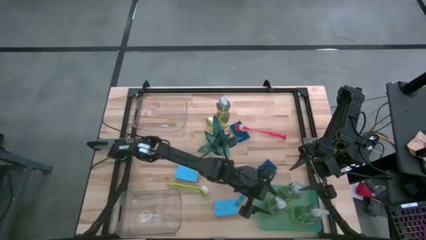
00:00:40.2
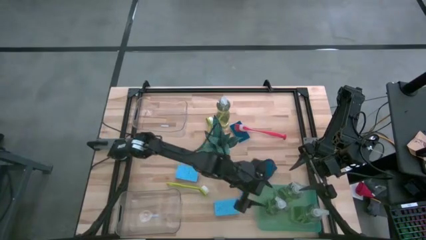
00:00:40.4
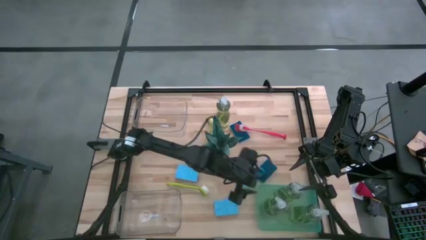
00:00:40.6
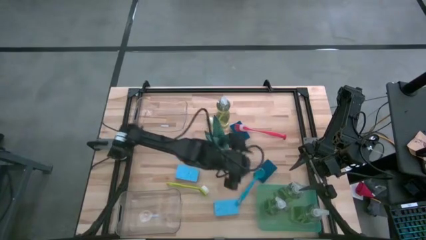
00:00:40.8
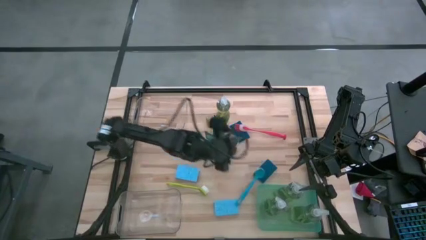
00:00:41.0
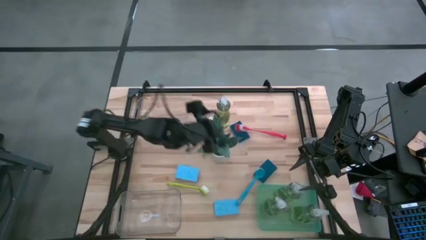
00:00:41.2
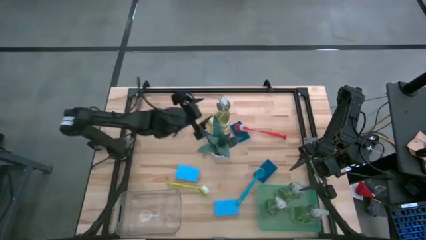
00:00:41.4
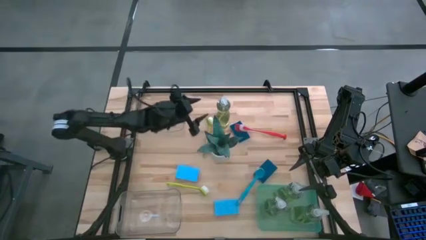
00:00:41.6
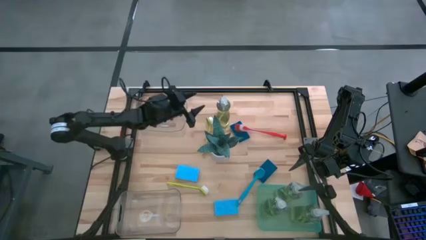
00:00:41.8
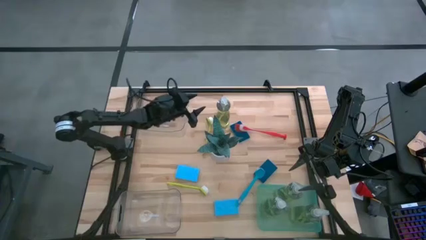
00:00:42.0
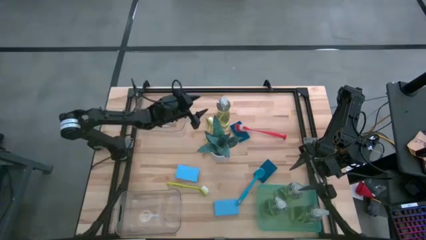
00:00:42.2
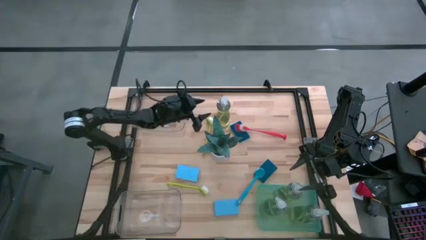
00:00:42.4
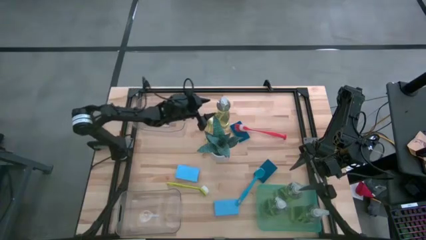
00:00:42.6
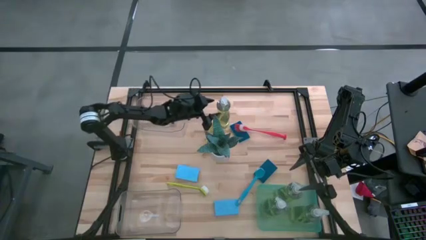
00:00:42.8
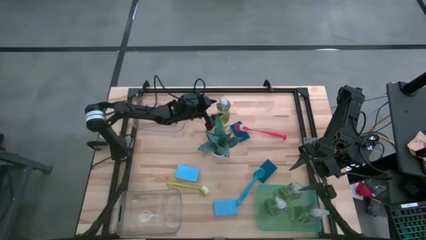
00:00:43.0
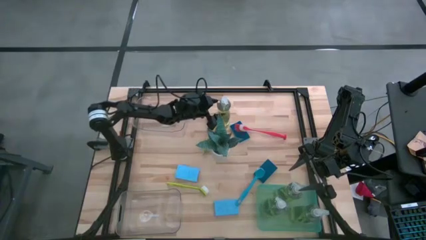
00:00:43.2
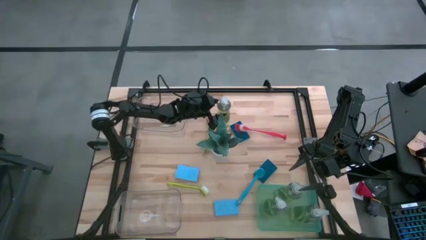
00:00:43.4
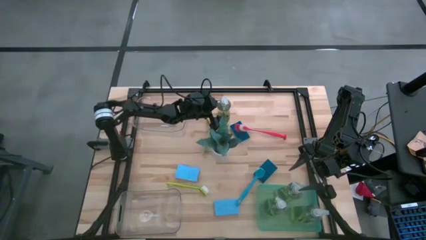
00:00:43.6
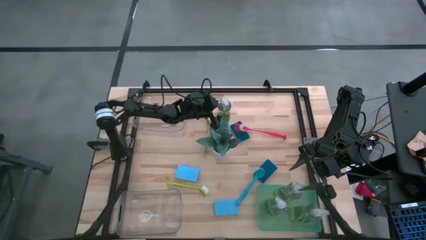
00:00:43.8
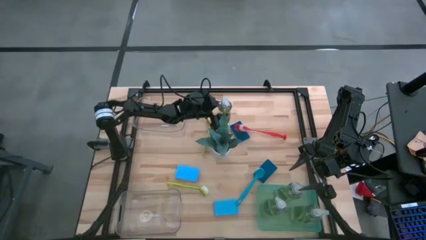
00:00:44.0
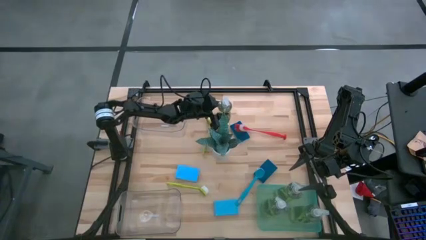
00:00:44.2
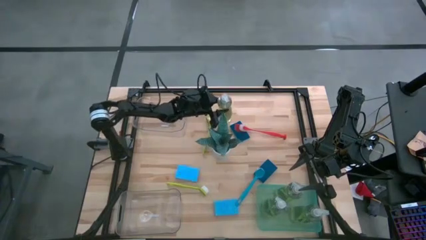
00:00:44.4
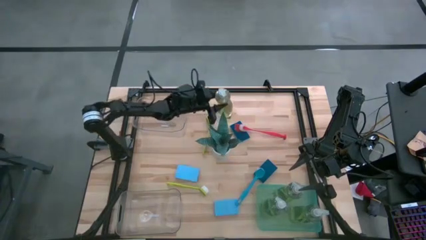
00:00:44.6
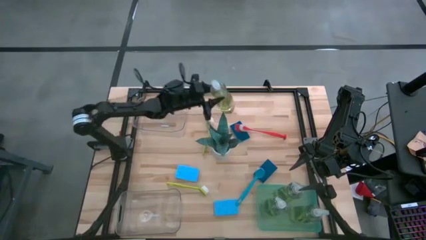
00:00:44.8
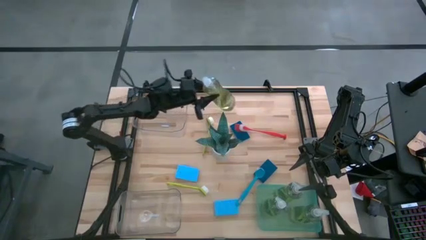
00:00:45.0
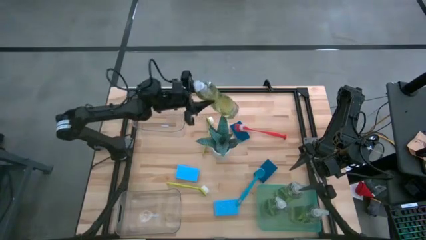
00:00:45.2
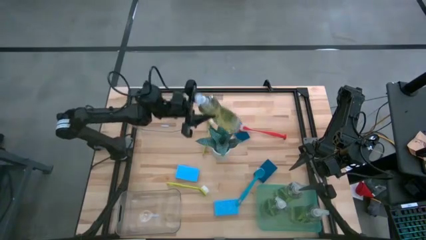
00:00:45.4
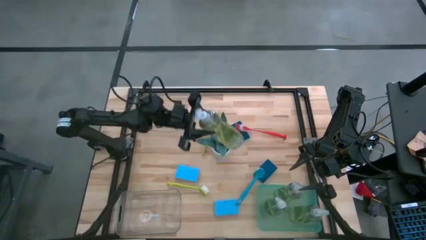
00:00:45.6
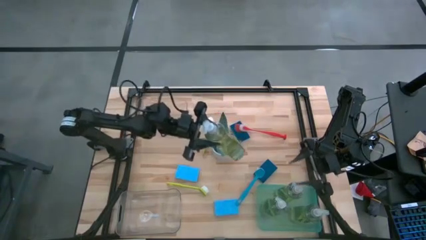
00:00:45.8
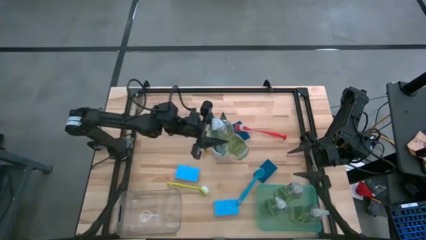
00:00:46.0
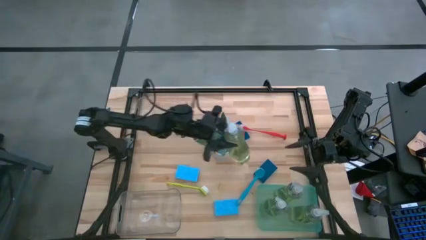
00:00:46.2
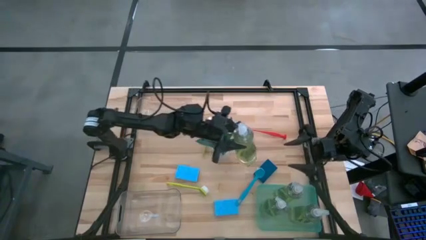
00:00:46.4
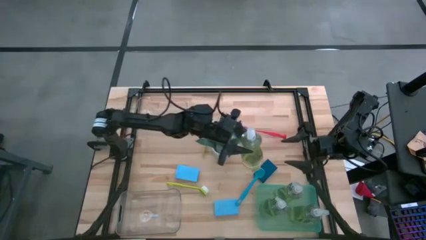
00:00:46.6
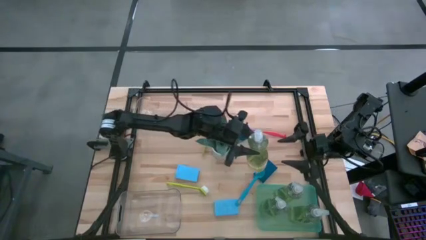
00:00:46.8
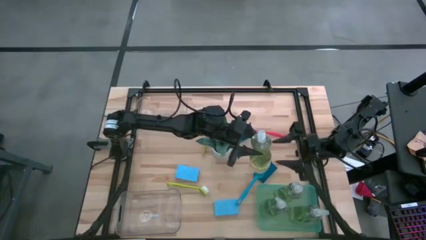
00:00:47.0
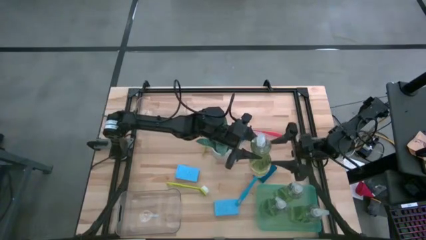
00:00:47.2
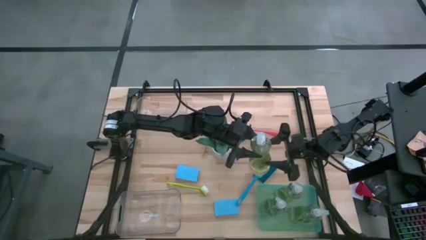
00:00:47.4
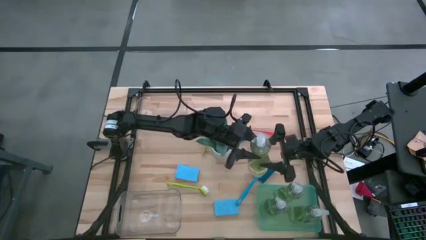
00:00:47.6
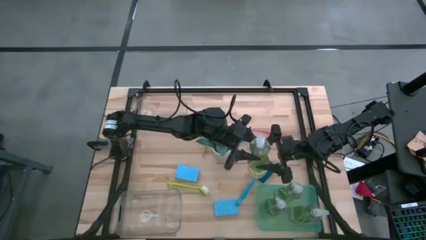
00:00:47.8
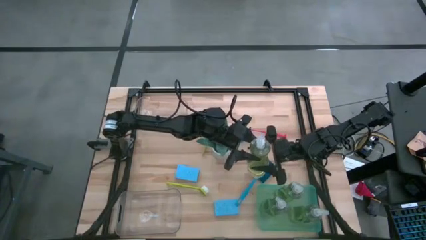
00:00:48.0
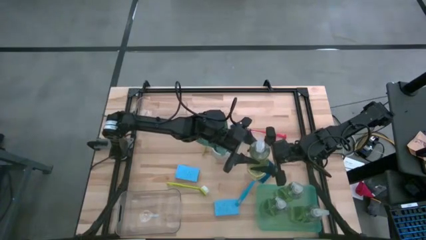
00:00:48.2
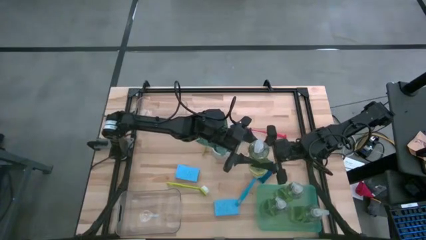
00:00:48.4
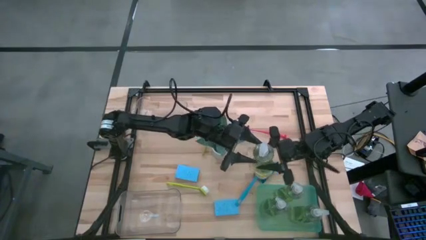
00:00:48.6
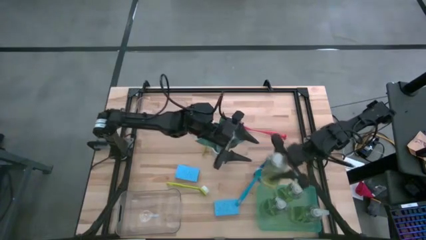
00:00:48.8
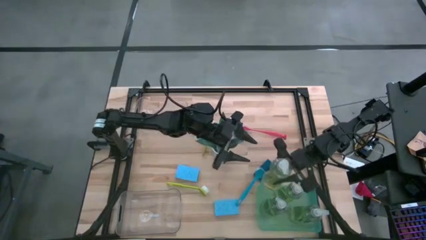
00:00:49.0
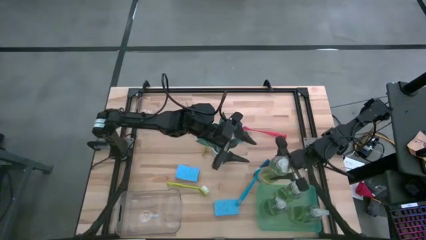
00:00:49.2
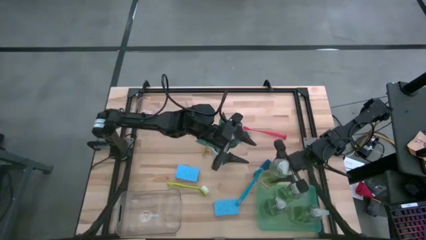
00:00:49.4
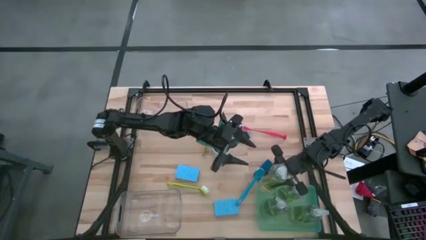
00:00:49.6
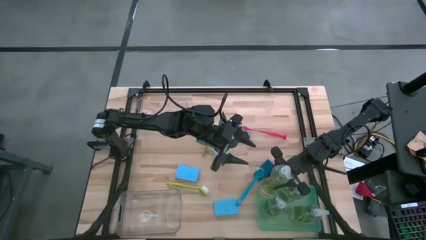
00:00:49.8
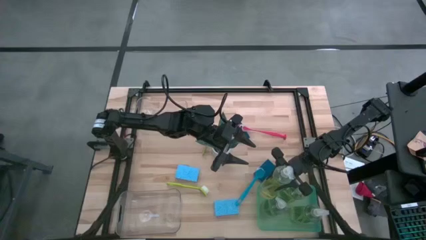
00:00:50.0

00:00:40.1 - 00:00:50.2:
Task: Pick & Place Kitchen Sink Supplies
Put the yellow dish soap into the green bin

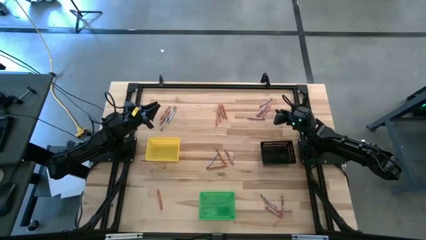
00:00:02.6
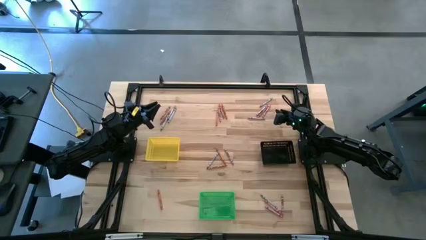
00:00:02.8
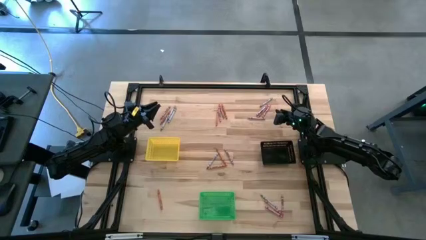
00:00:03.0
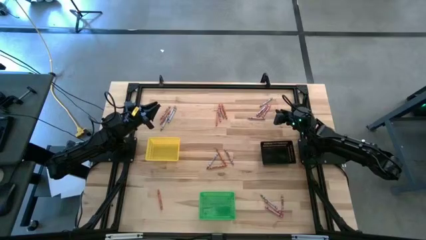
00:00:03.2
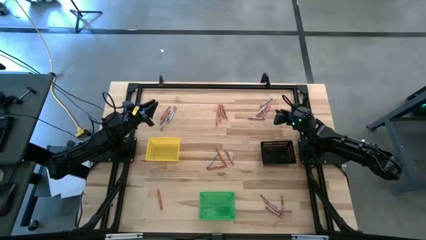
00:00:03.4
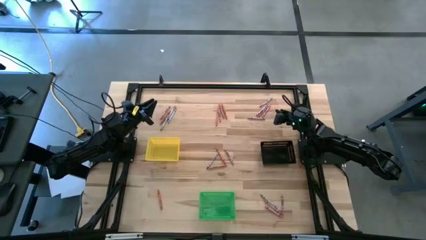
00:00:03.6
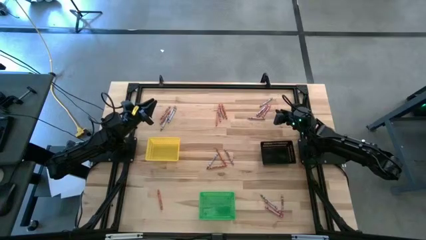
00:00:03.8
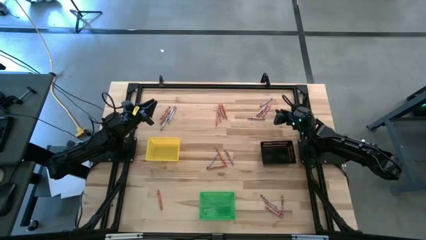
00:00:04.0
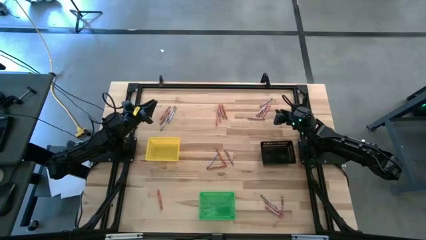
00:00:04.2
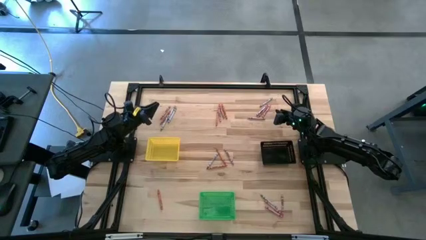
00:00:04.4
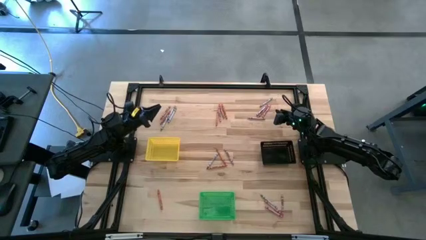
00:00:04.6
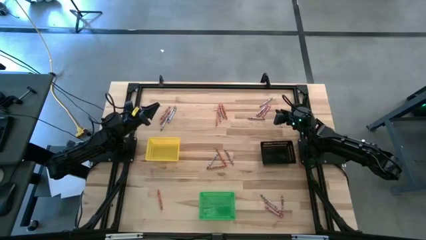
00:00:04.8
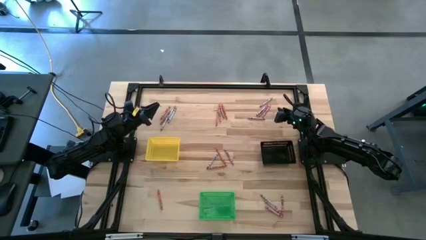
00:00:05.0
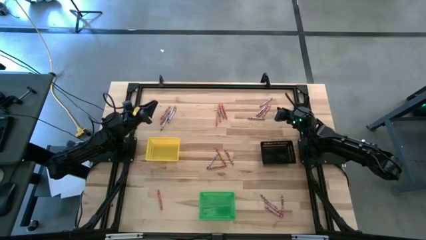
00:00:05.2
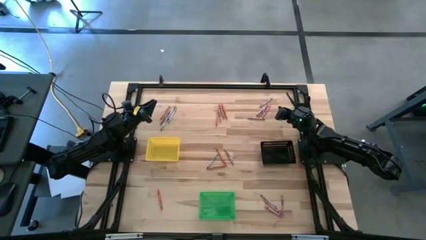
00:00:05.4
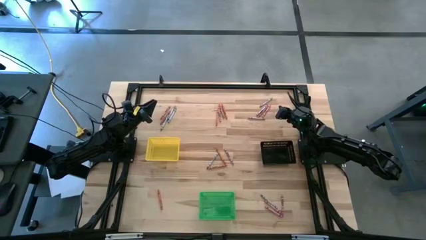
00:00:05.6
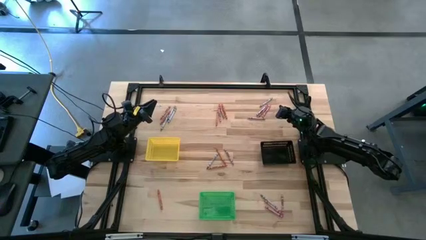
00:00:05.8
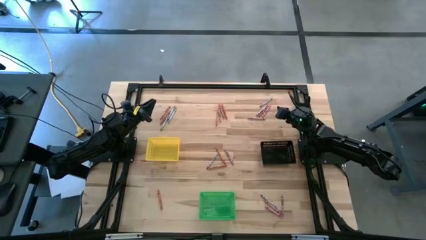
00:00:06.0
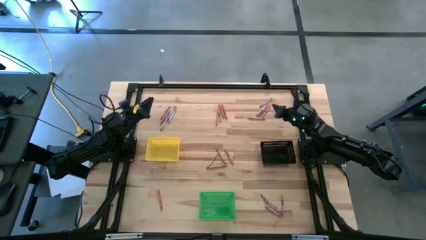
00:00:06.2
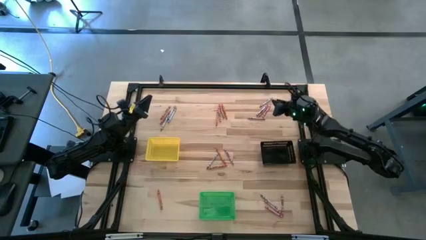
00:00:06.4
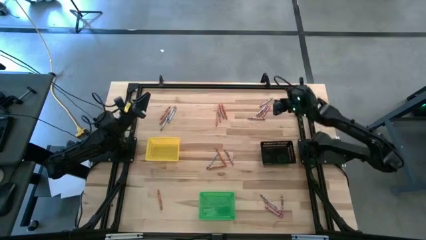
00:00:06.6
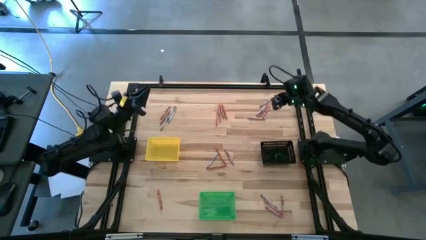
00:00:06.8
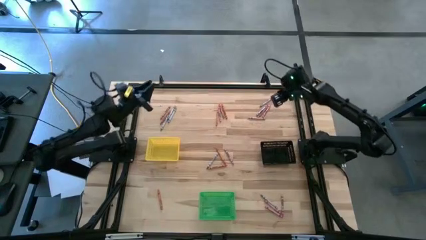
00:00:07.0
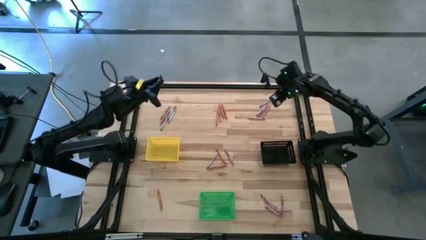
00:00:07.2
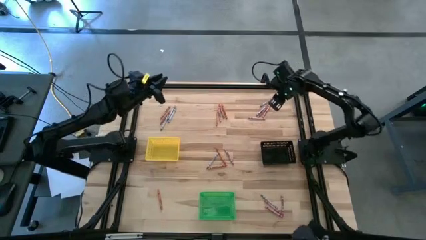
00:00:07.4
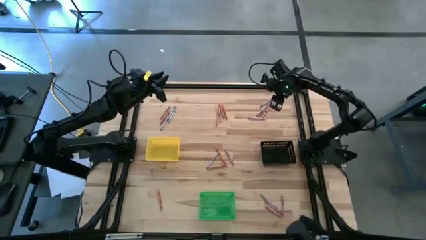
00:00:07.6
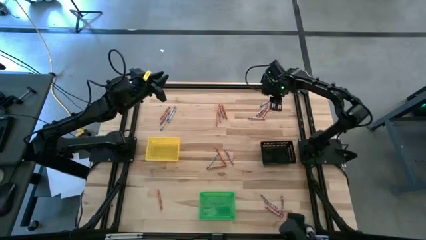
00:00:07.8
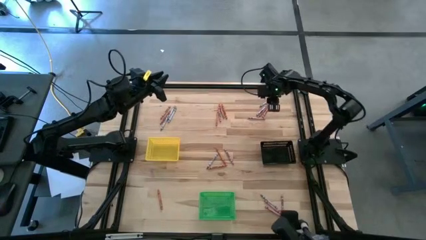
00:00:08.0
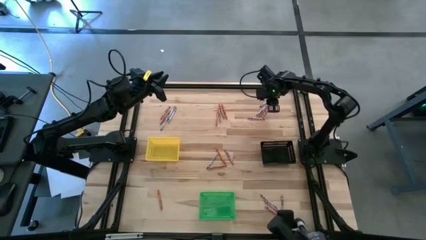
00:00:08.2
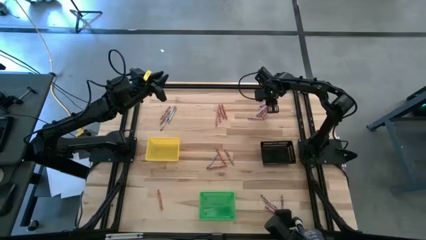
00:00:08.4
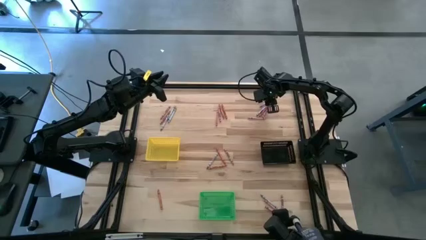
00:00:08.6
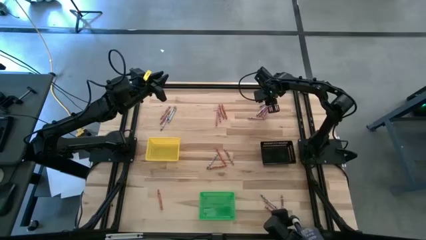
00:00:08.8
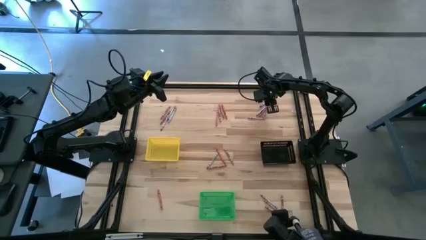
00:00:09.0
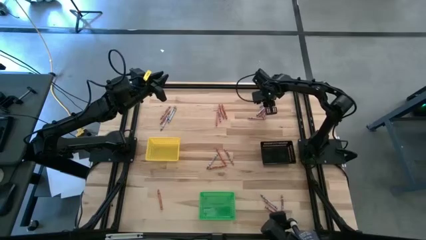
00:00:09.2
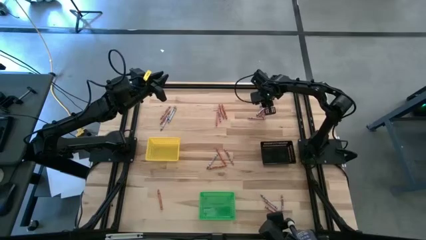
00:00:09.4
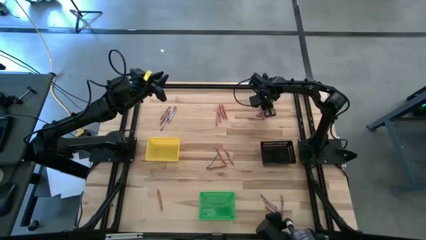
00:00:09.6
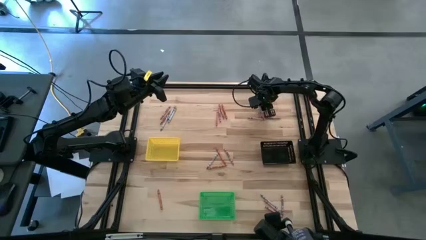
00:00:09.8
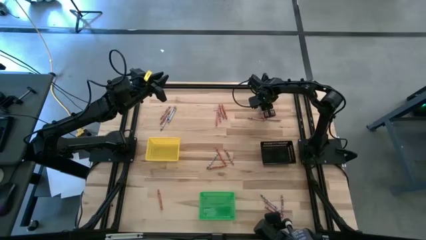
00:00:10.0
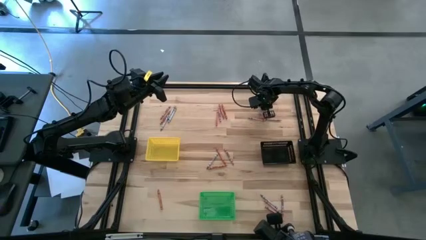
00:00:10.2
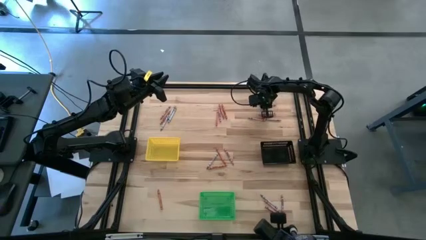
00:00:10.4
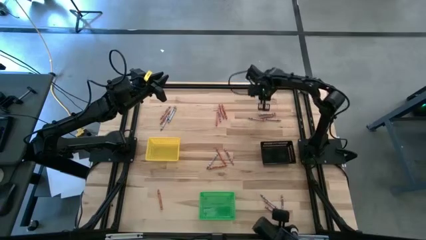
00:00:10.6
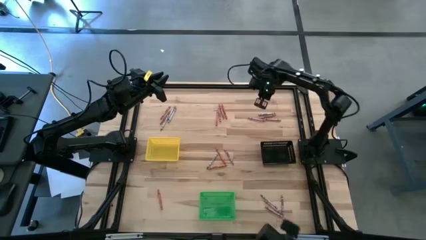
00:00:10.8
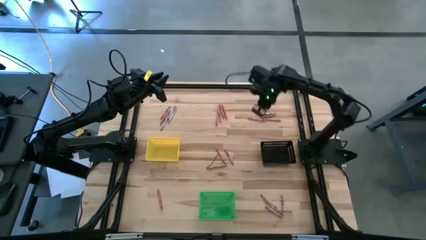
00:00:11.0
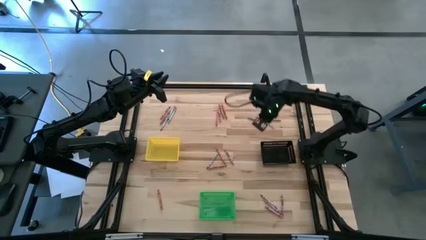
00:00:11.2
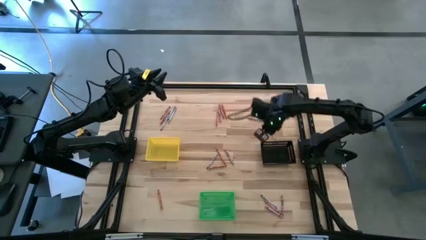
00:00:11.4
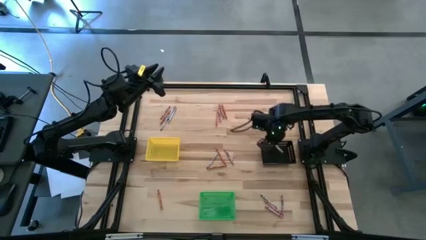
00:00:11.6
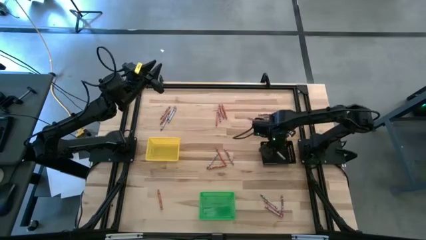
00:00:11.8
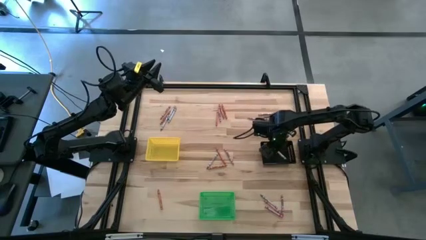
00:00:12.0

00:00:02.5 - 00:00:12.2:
Task: Sort crayons
Put the gray crayon into the black bin
